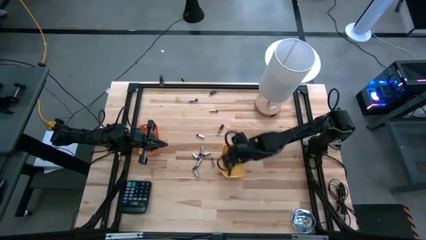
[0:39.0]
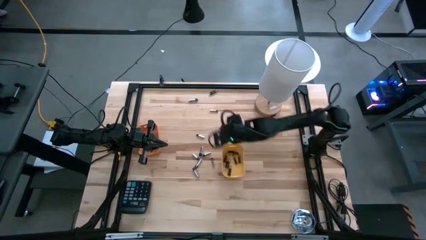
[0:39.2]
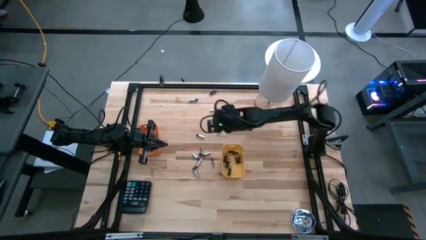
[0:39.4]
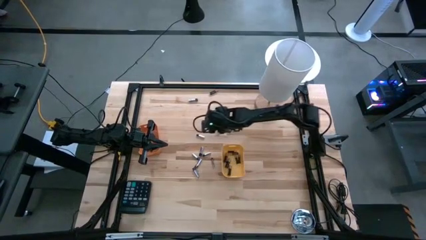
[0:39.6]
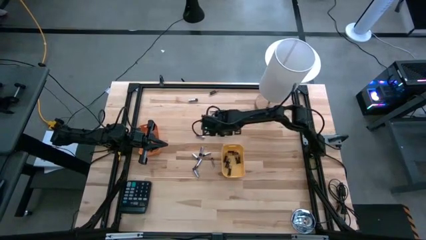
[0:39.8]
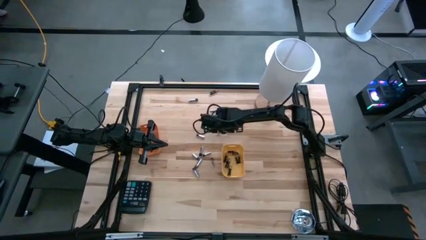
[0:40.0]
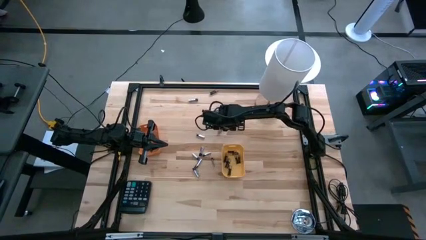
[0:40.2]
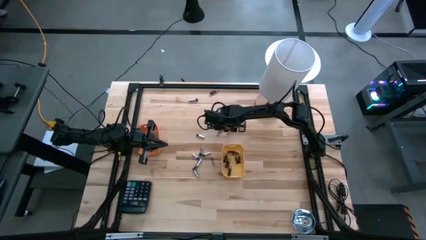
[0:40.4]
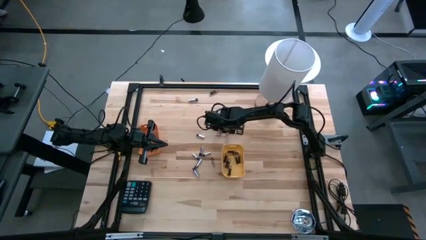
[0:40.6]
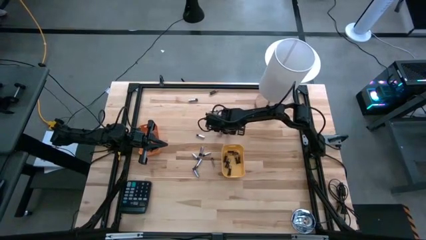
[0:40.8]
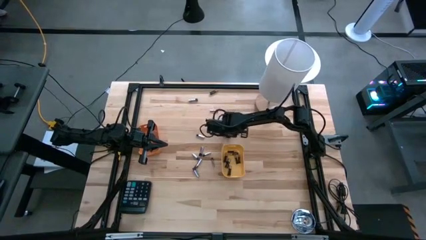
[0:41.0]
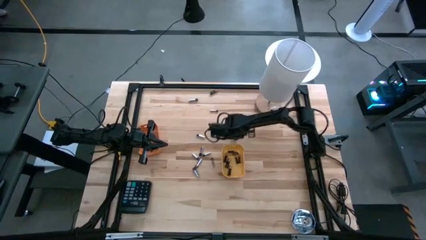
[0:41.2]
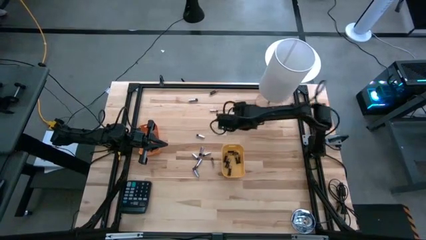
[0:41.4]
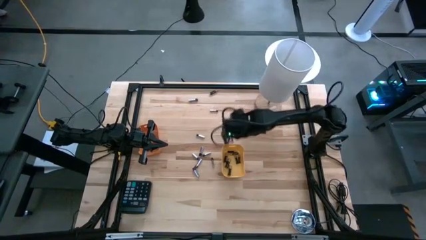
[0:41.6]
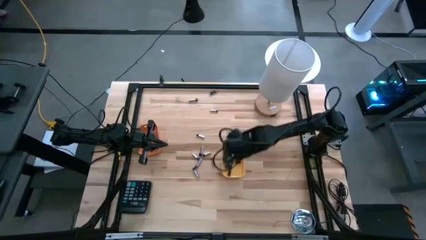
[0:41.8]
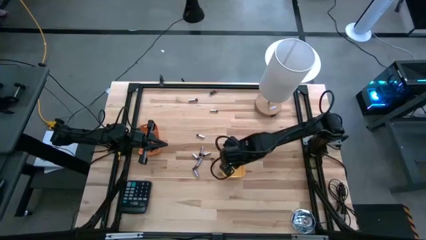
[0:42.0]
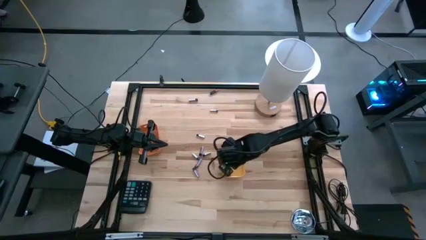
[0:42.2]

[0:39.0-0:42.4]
Task: Sort batteries
Put the black battery into the yellow bin

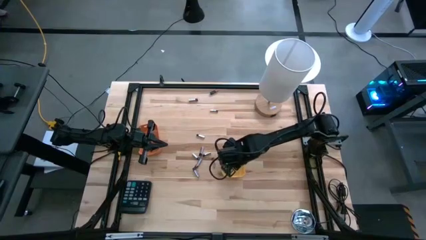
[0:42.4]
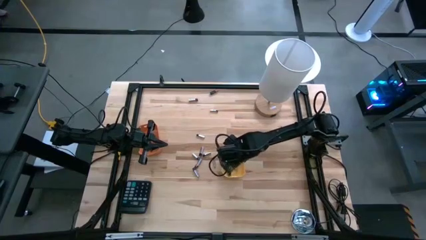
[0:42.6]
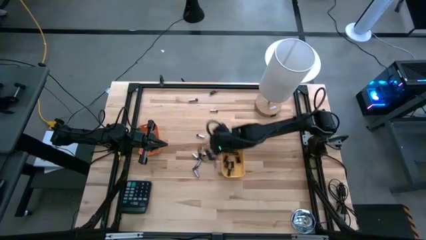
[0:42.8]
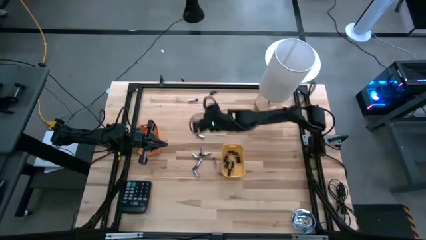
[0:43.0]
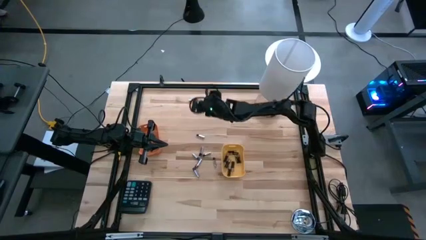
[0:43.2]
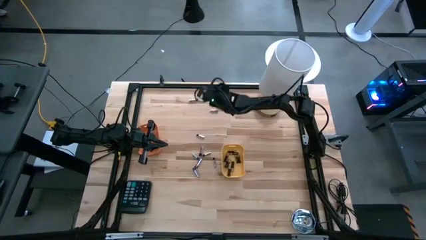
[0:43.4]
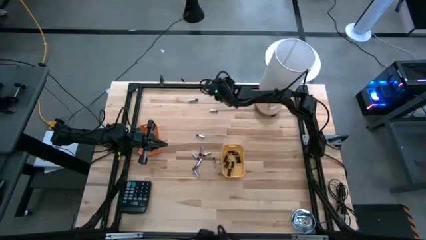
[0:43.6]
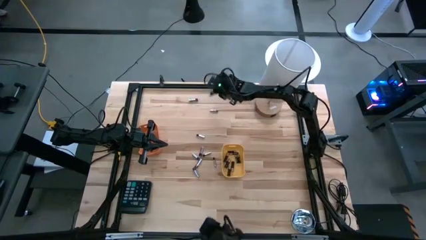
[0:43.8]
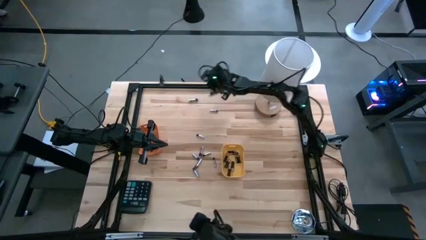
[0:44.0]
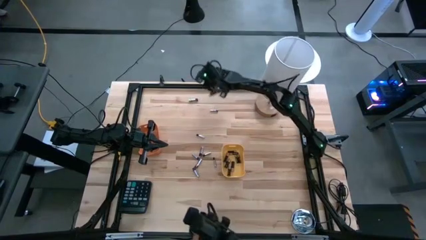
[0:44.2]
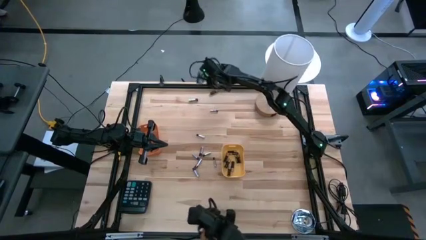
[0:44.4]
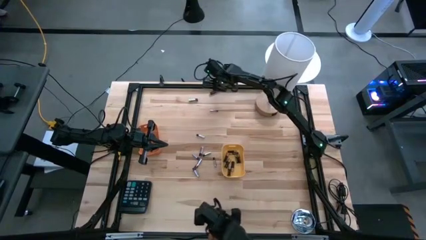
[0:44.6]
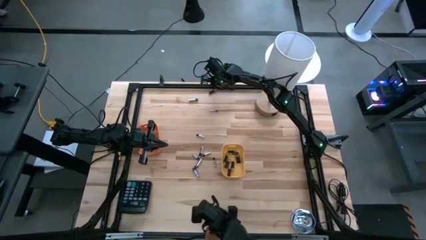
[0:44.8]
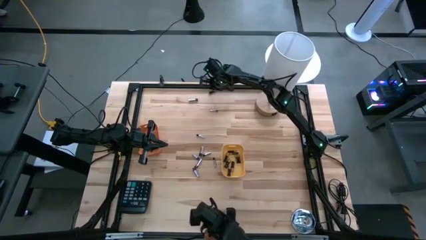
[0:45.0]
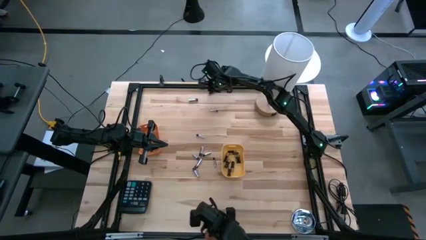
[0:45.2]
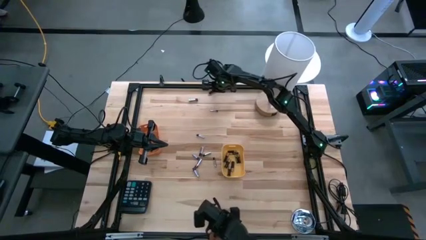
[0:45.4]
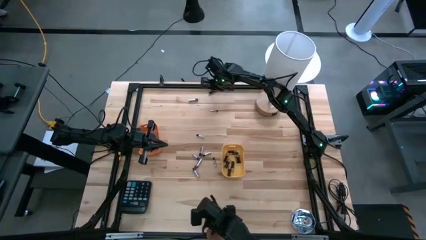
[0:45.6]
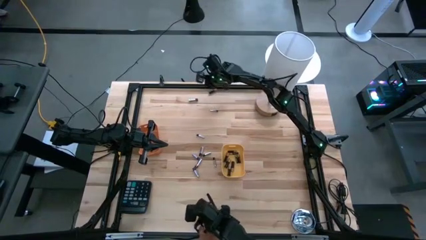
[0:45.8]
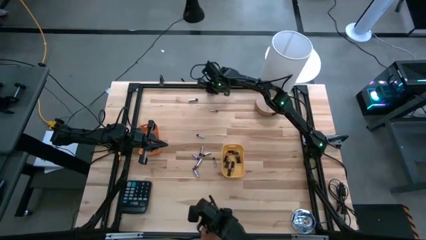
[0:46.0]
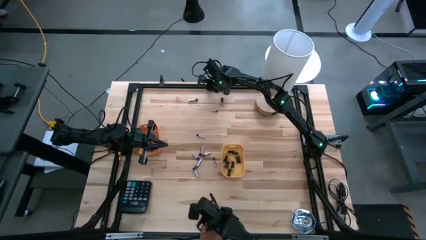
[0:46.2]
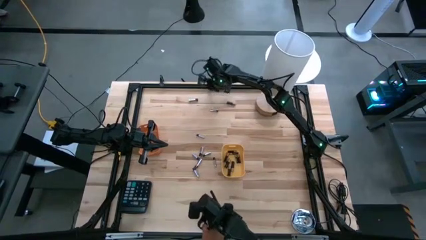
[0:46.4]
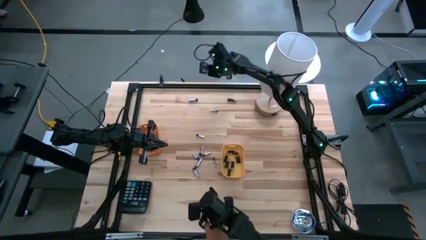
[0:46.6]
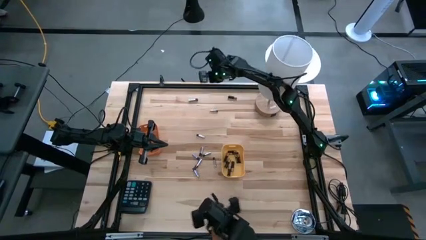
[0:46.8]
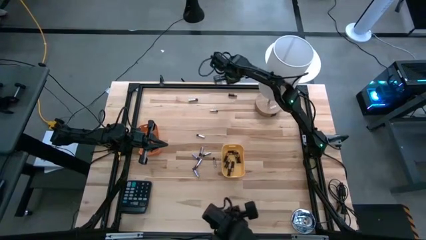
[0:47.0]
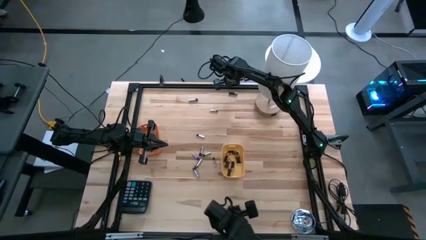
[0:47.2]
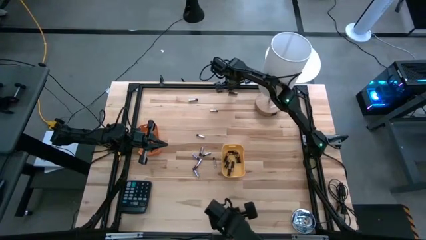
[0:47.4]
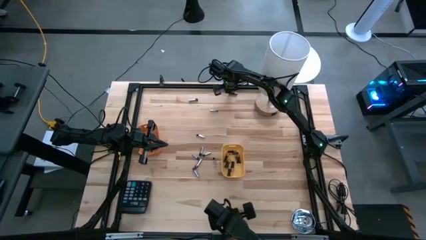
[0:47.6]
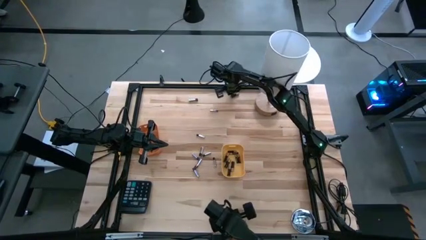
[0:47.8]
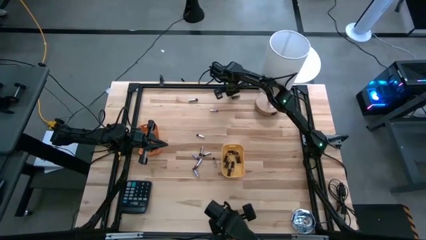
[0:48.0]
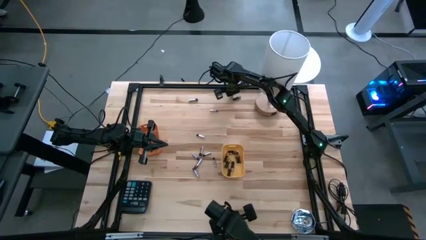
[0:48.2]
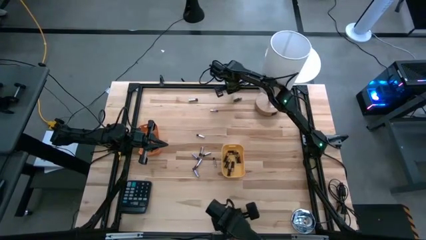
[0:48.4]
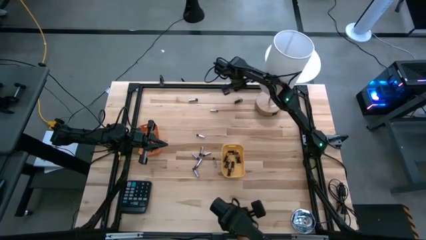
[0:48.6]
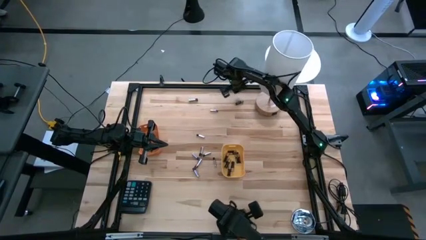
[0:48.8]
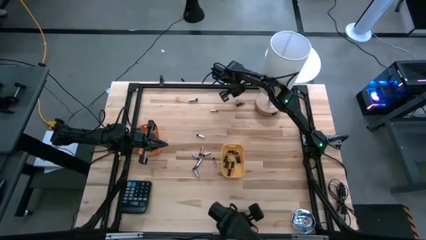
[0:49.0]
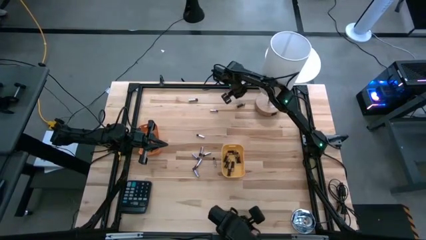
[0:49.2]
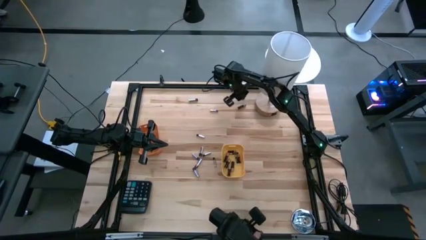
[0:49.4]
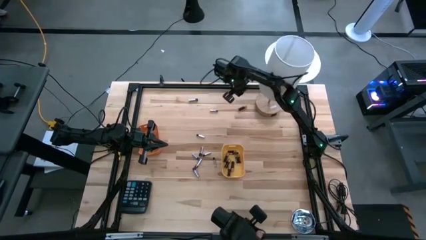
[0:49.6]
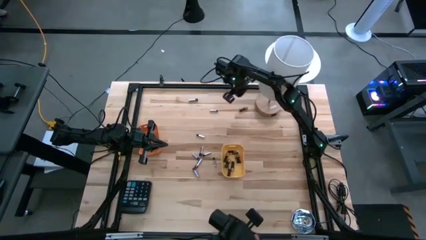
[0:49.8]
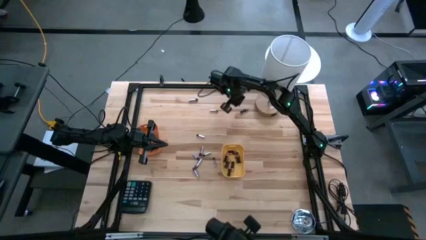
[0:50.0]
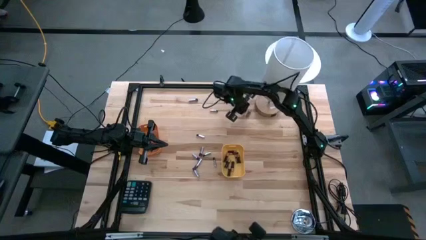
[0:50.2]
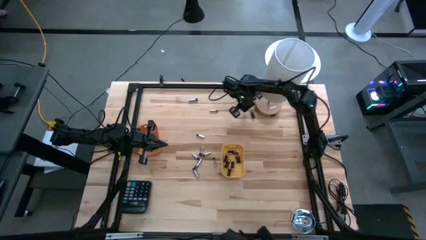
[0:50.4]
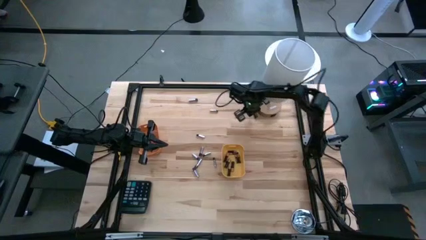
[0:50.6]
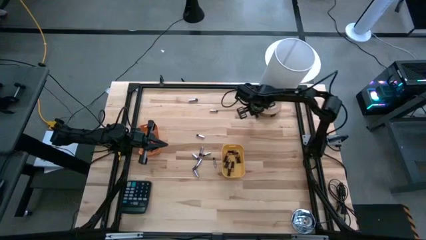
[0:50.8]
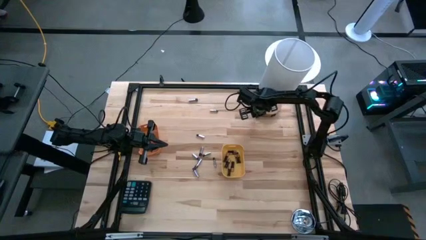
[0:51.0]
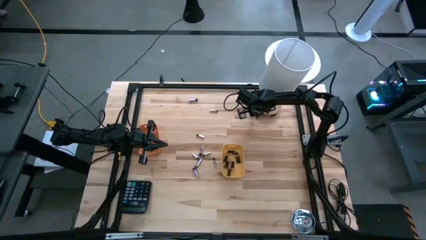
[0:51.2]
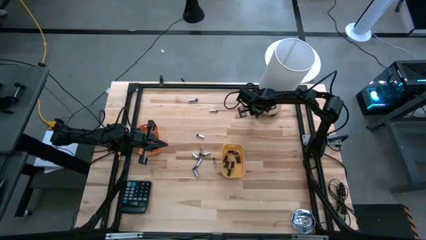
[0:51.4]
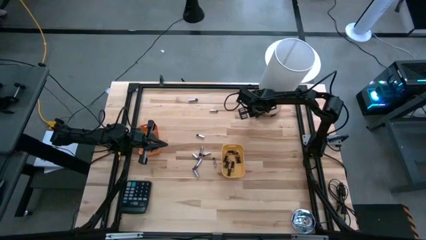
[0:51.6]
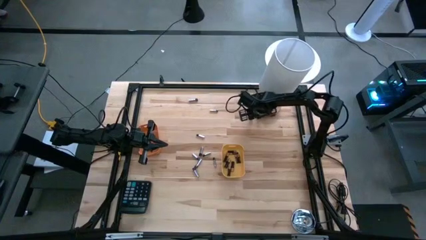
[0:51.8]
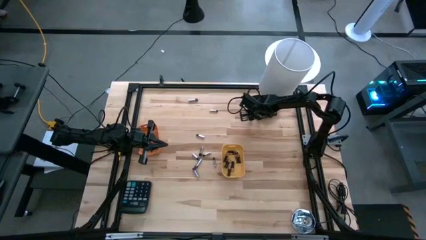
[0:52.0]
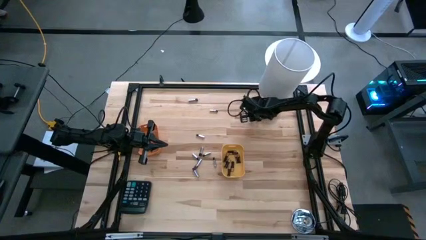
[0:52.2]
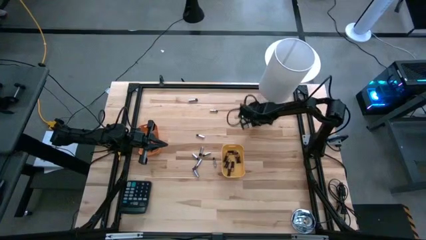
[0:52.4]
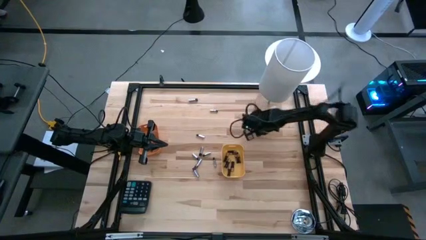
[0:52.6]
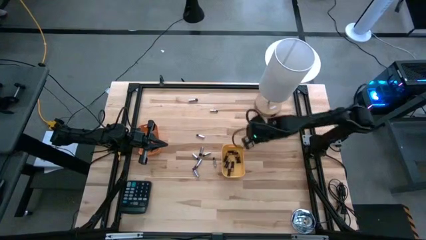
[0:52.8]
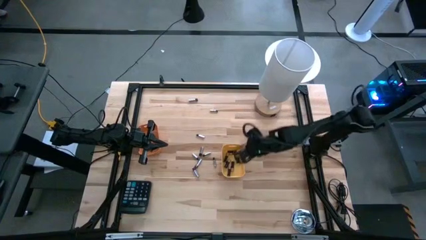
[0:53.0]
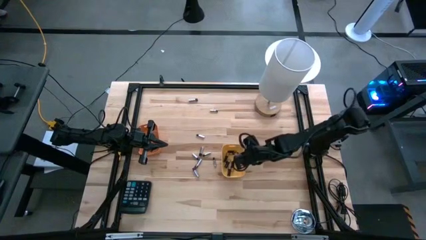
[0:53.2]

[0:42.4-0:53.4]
Put the black battery into the yellow bin

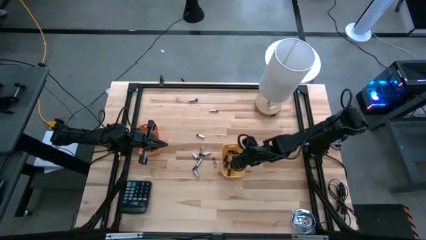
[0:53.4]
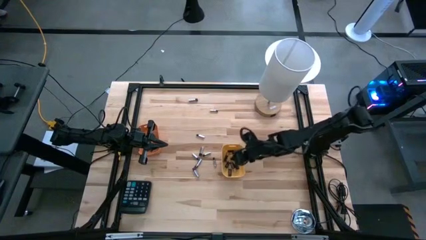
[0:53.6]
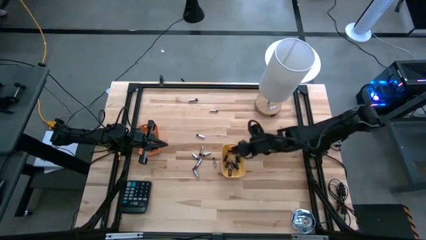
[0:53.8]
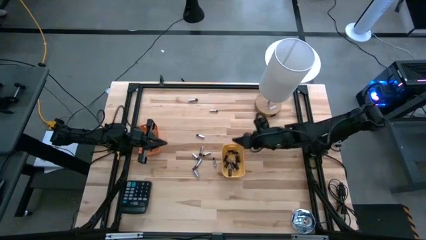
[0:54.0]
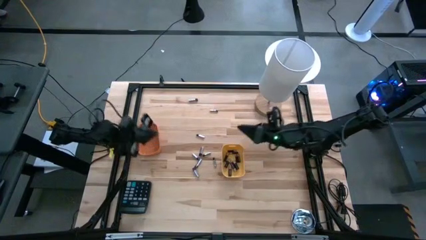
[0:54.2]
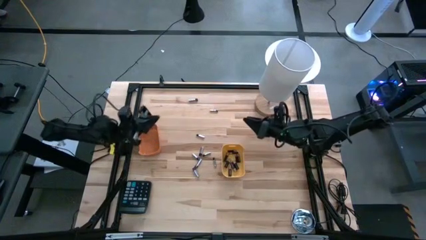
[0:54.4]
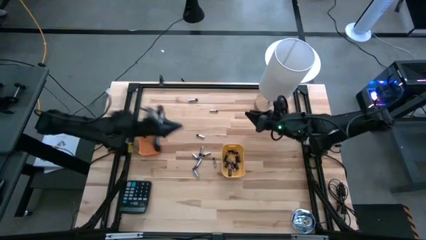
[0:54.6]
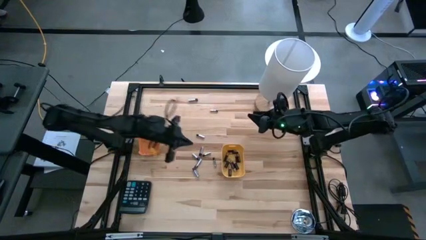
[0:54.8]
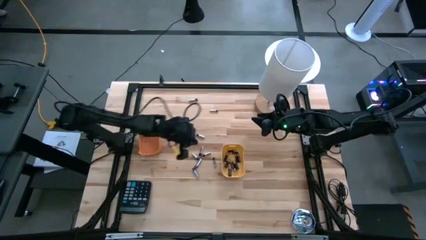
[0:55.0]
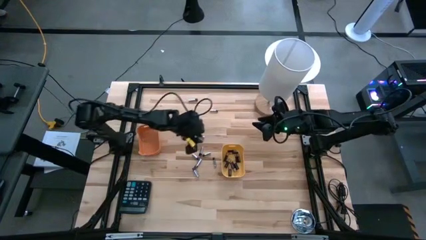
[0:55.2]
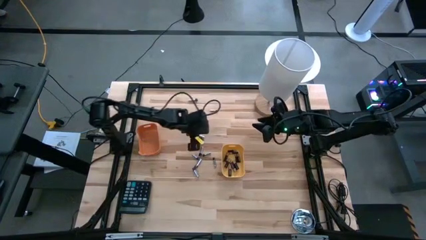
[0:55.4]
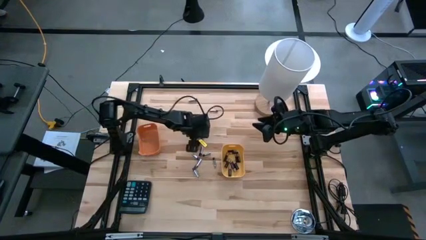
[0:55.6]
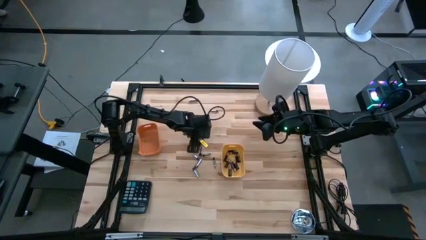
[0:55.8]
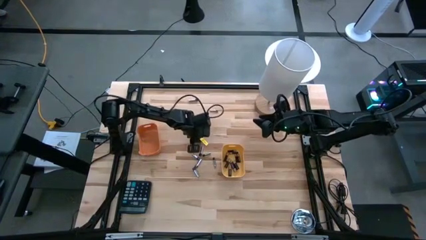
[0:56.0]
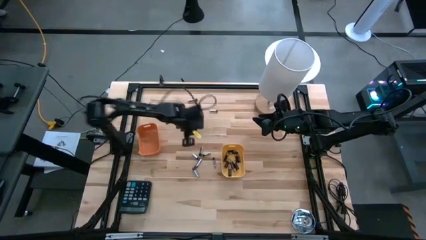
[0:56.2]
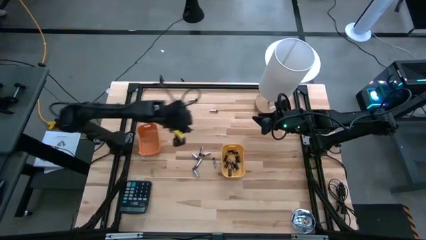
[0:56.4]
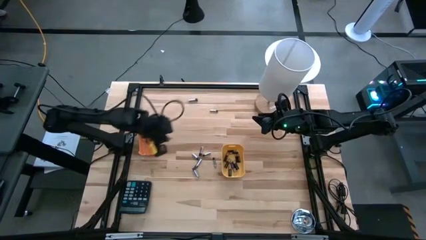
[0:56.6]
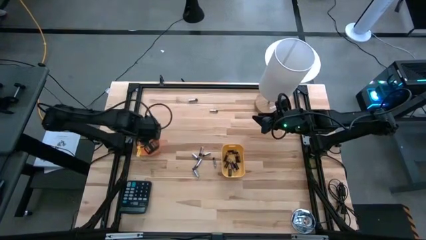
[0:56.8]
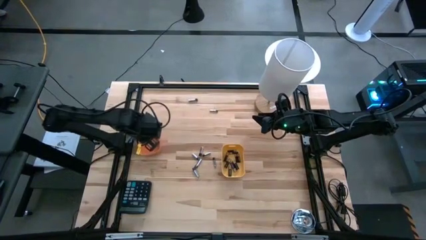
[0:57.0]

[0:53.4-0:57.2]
Put the silver battery into the orange bin
